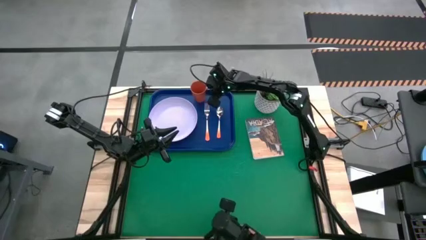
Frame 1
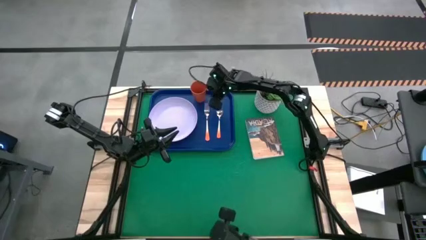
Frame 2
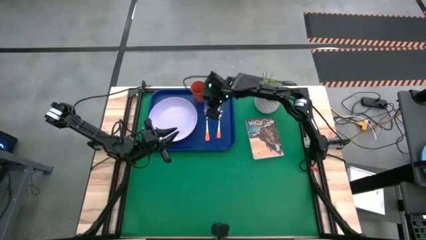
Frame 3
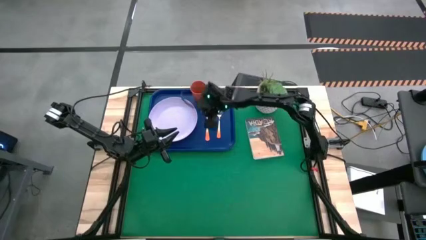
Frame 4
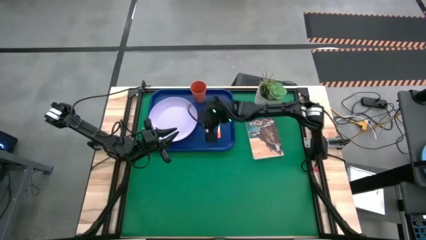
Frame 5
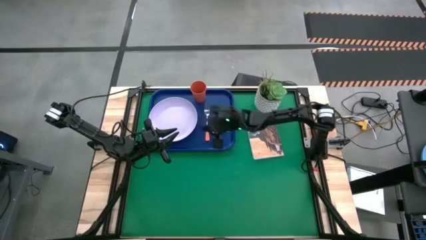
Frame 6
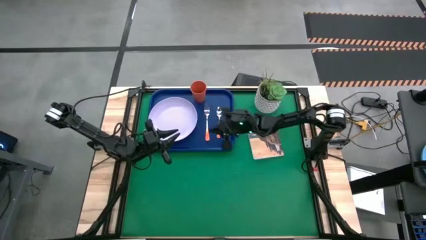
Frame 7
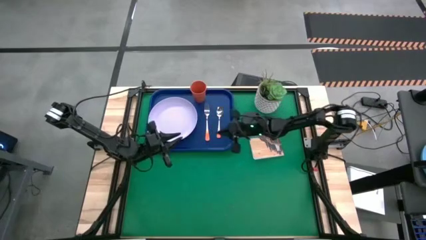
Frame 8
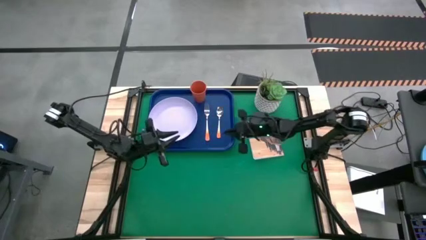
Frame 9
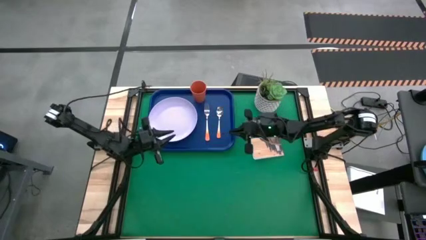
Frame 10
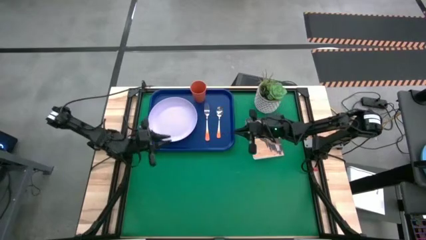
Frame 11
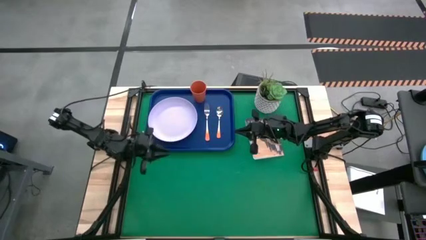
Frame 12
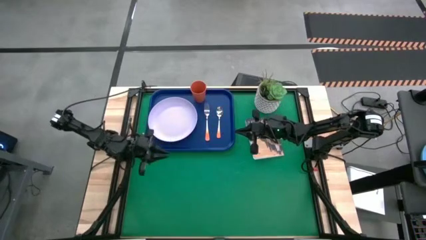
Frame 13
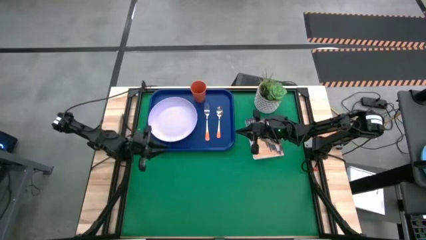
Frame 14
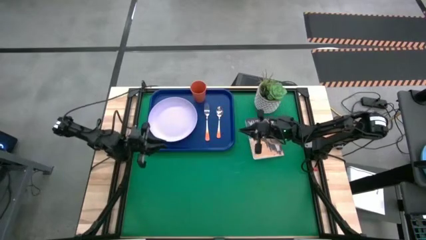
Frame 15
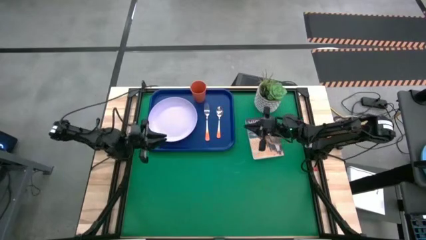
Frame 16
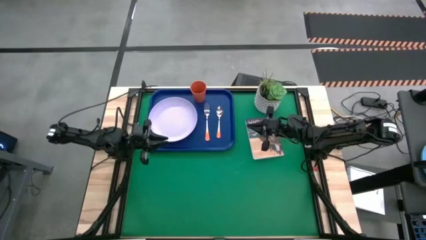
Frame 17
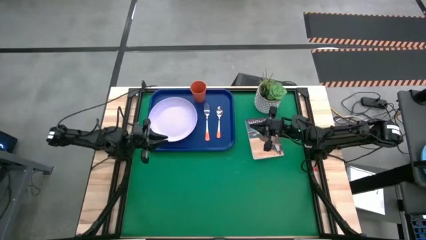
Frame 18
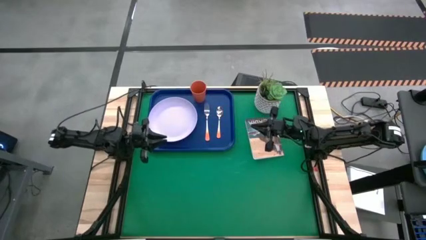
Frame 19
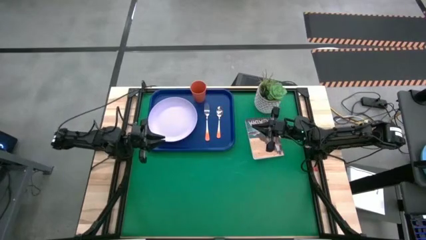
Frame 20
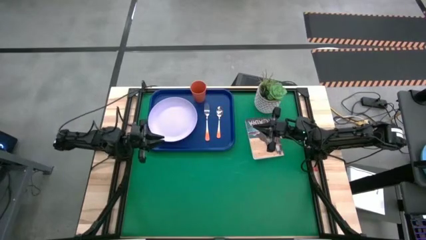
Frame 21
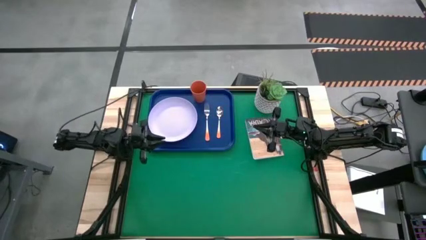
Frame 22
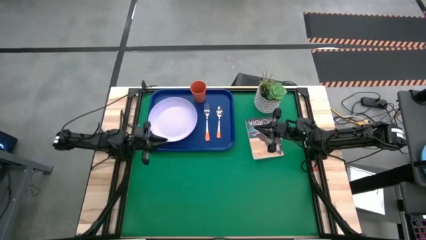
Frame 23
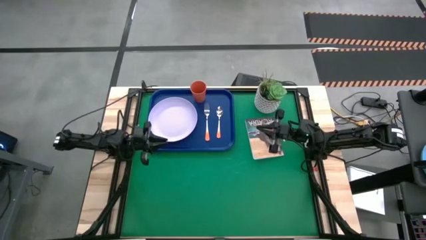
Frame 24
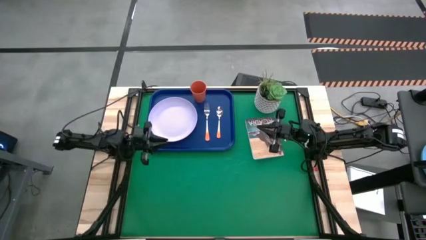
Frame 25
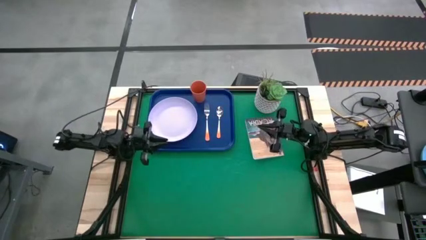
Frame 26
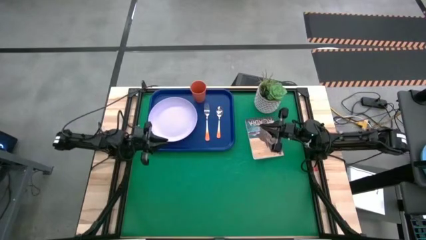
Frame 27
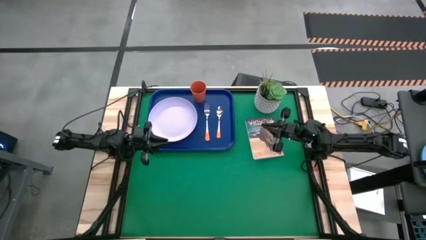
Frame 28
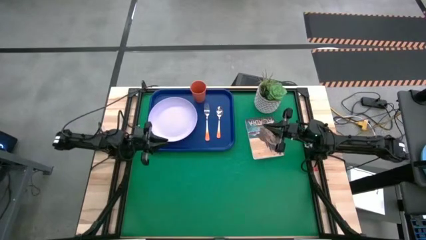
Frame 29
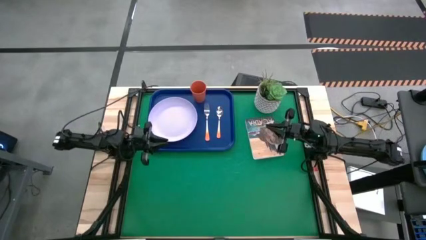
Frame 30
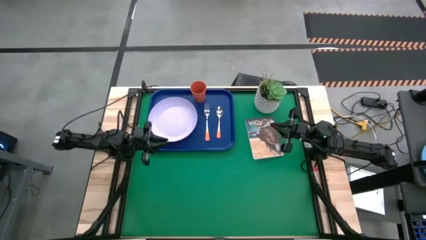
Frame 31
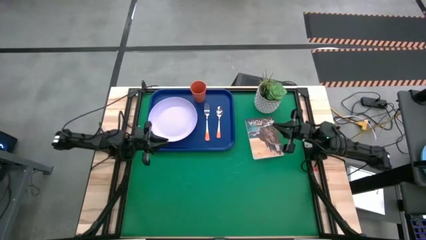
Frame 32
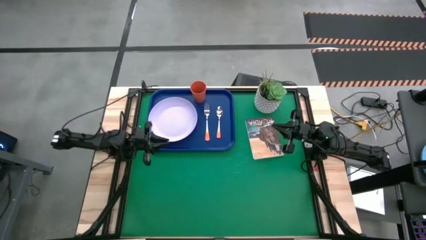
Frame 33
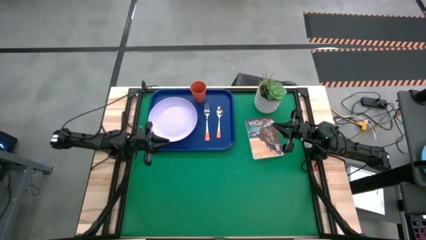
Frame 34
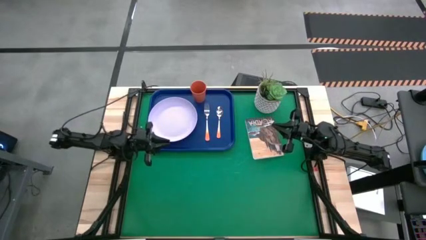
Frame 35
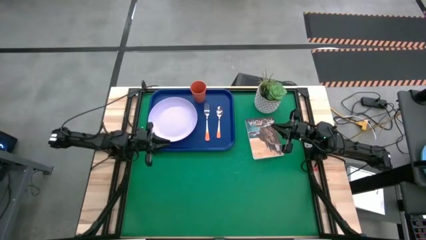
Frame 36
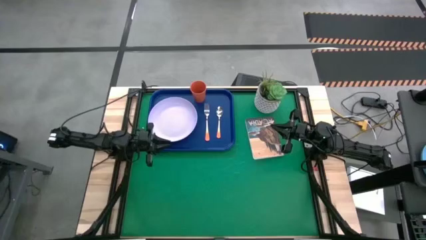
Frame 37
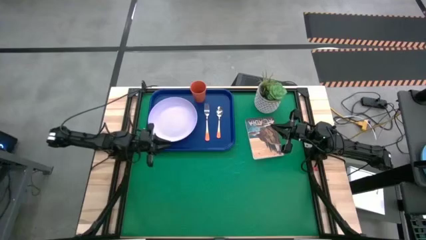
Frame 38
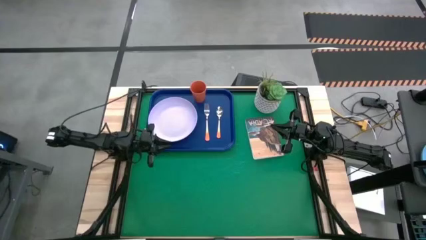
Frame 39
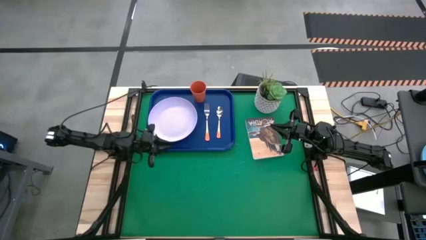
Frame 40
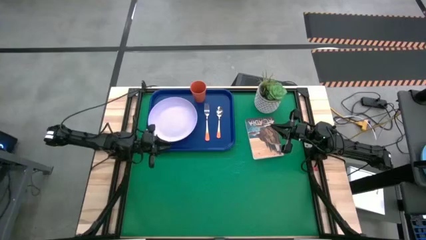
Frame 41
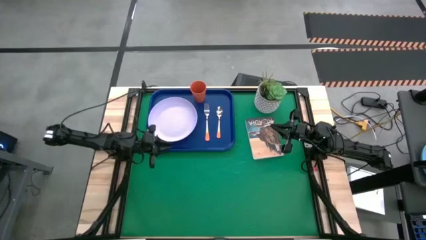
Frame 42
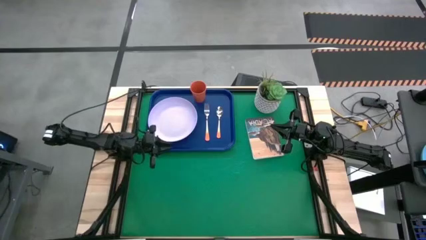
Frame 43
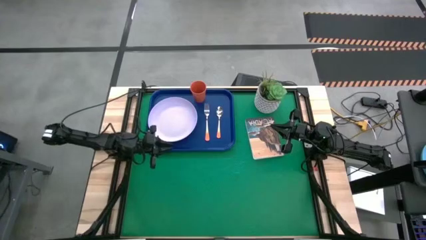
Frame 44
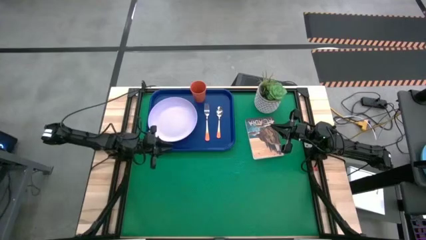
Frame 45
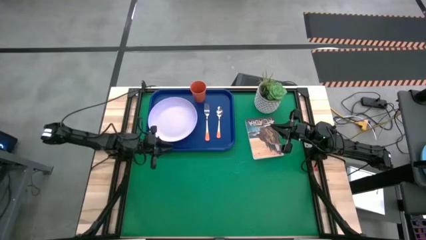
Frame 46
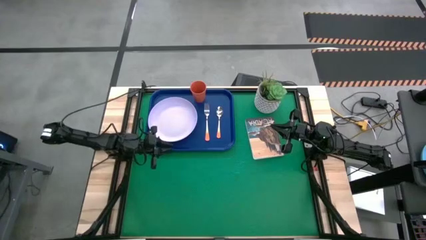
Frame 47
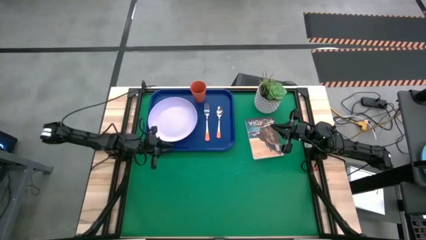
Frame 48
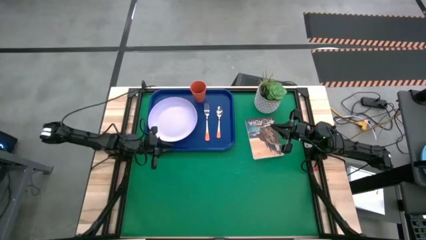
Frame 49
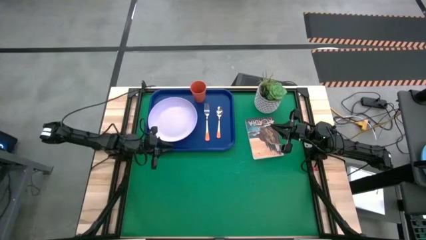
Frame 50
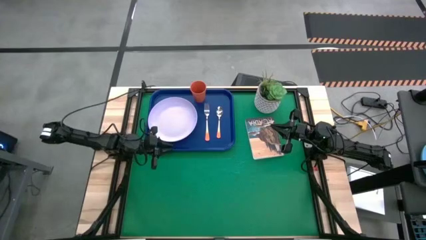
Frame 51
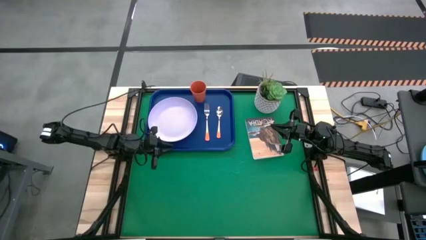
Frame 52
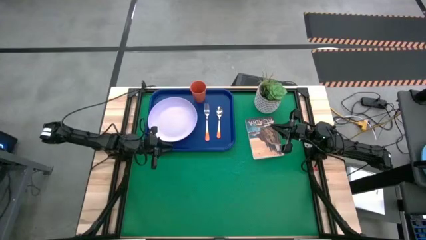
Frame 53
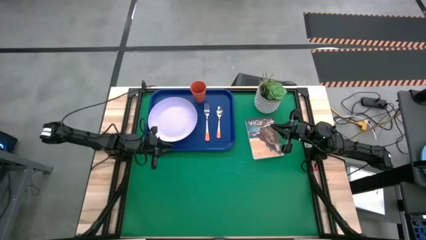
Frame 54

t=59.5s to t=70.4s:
Task: Pick and place plate/cup/fork/spoon on tray
Return to Home Position
